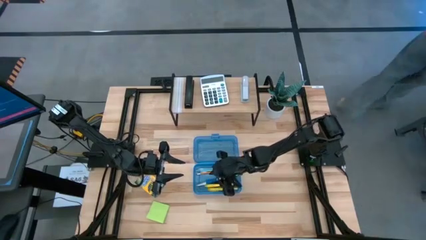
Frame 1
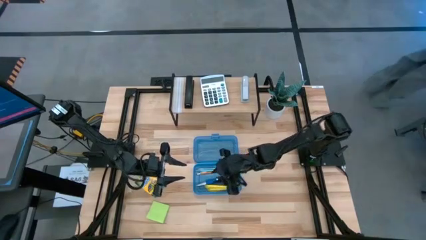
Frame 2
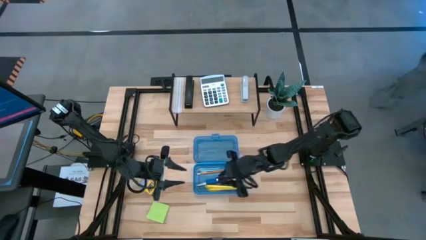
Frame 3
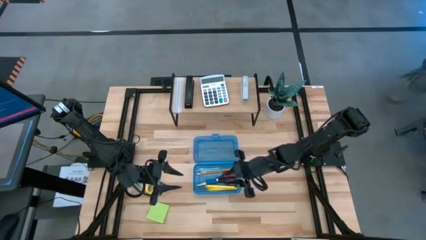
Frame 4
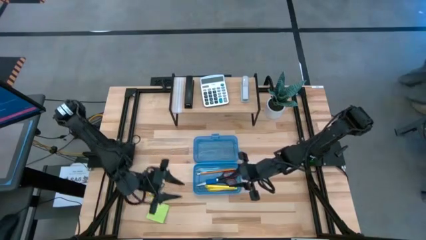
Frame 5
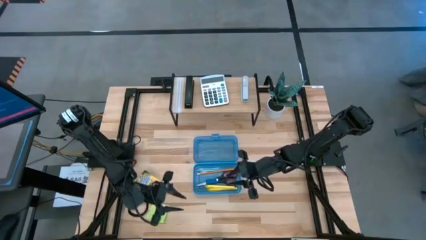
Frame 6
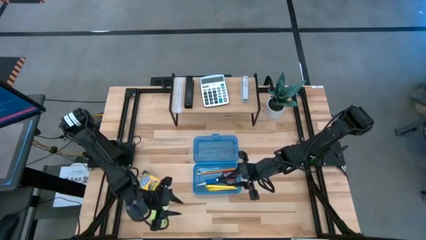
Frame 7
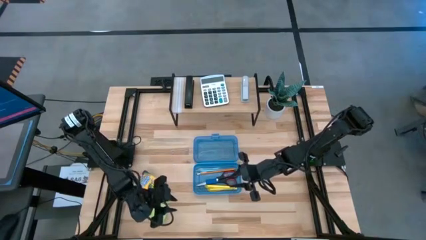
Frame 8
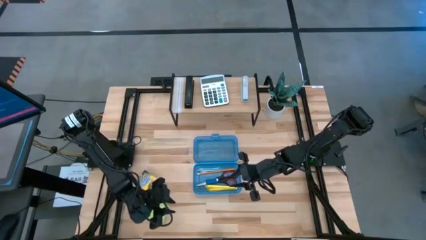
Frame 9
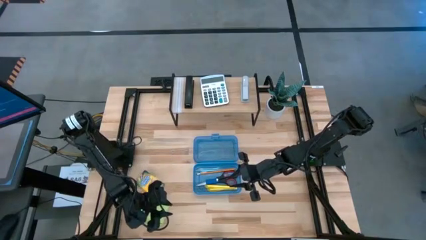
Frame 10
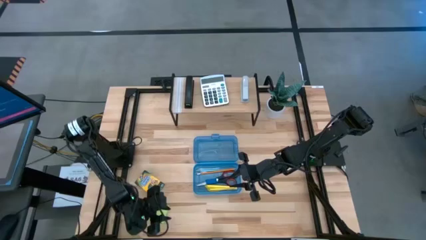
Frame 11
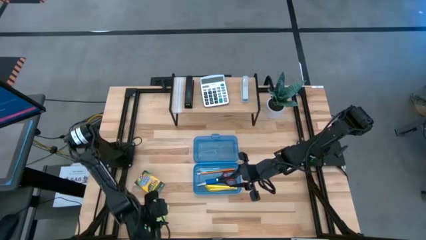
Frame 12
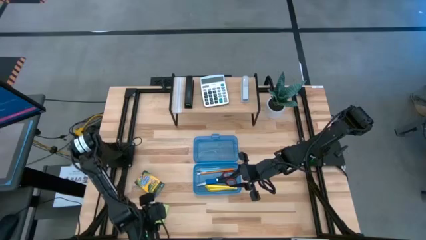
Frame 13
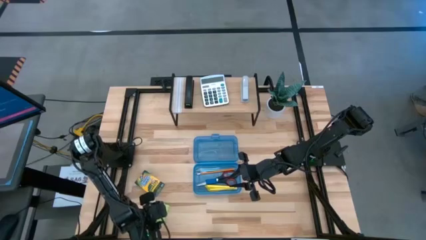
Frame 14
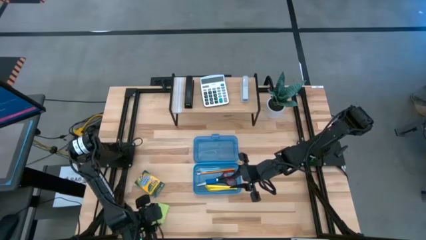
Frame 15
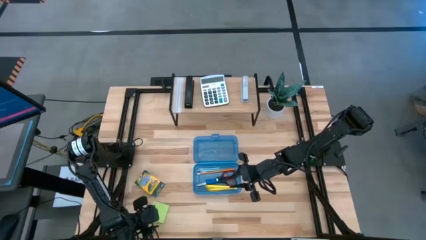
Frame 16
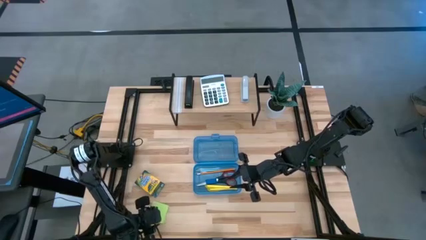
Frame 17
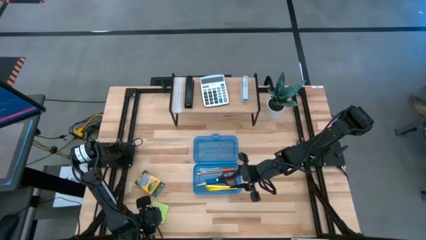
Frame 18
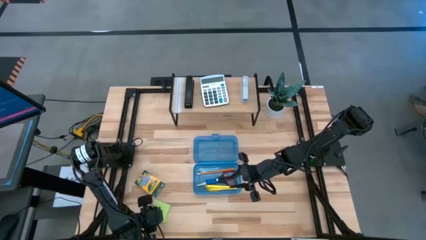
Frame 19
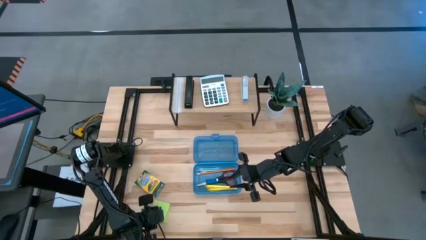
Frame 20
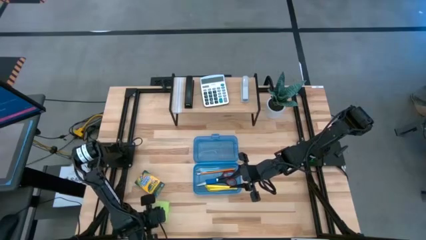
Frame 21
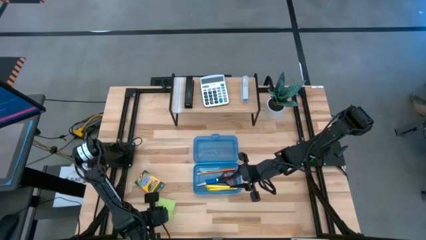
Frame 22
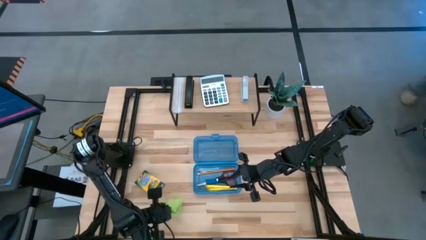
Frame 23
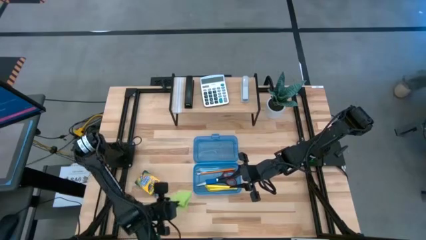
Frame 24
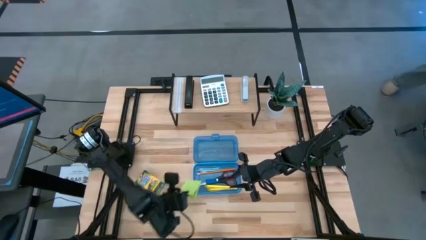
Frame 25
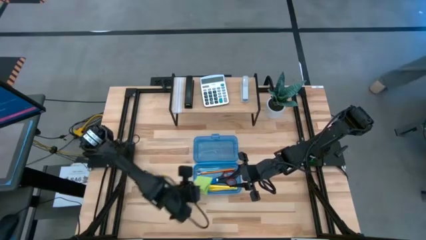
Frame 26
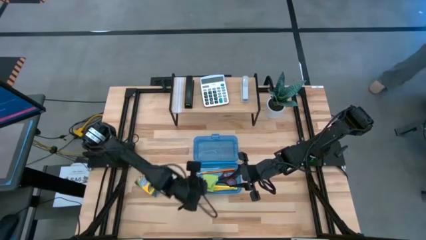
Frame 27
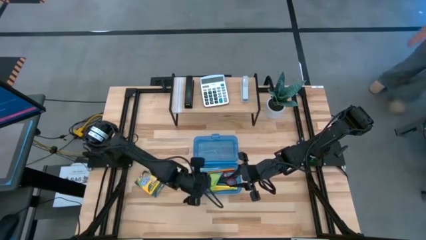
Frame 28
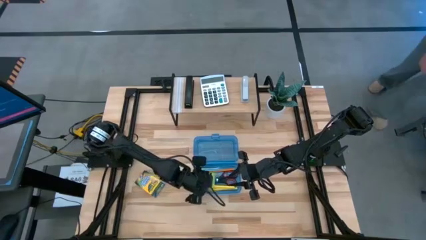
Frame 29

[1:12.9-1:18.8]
Task: Pack school essentials
Put the green sticky notes into the blue supply box

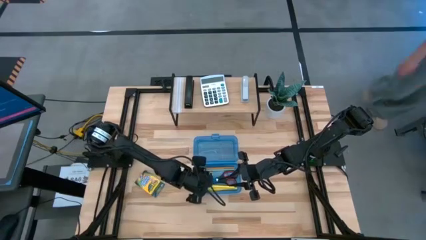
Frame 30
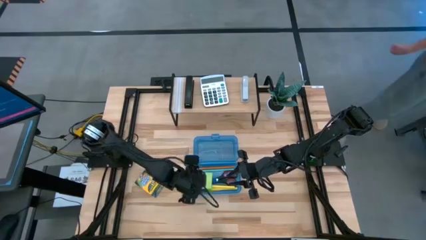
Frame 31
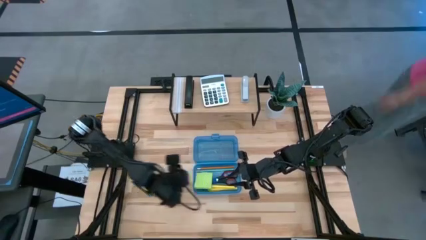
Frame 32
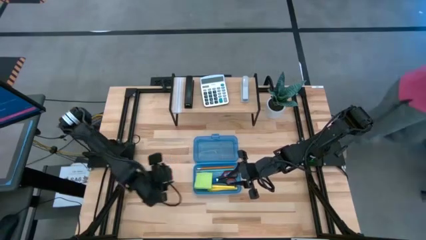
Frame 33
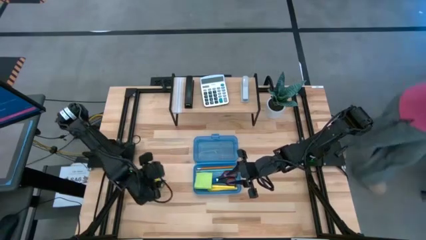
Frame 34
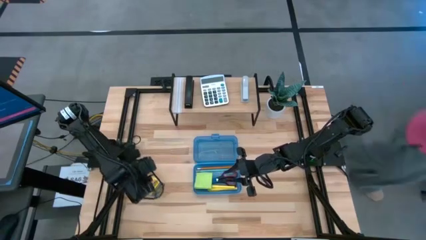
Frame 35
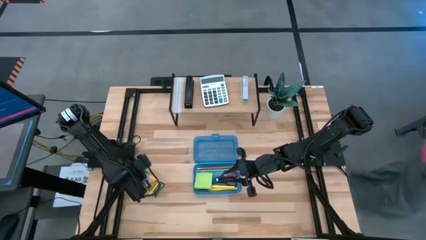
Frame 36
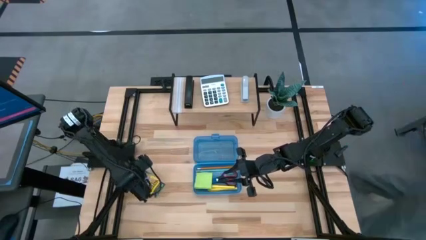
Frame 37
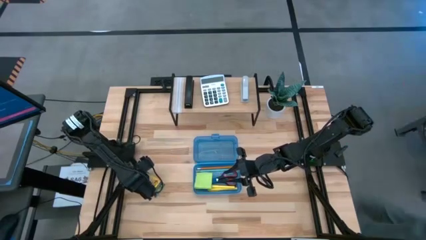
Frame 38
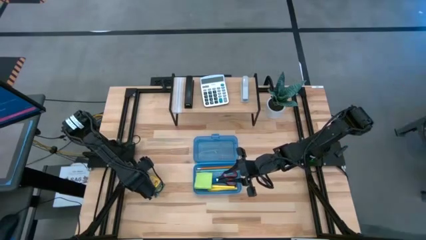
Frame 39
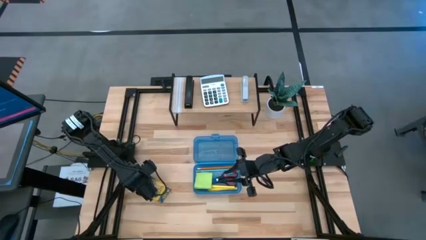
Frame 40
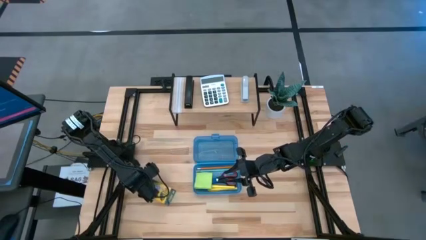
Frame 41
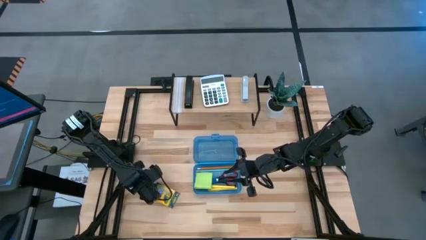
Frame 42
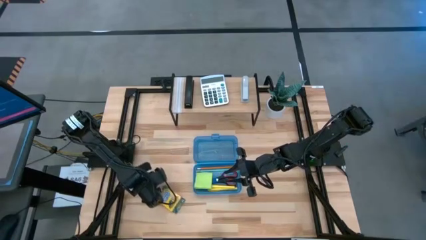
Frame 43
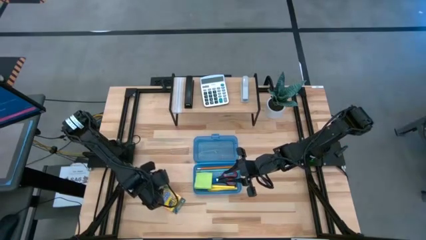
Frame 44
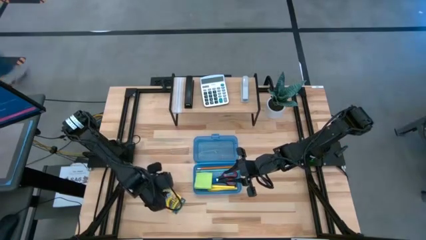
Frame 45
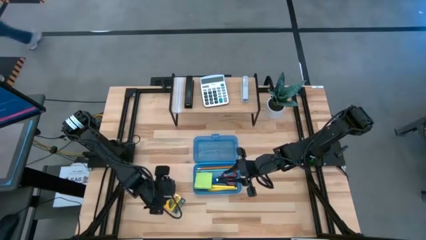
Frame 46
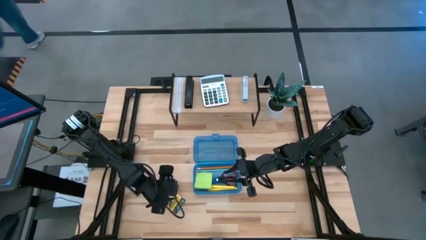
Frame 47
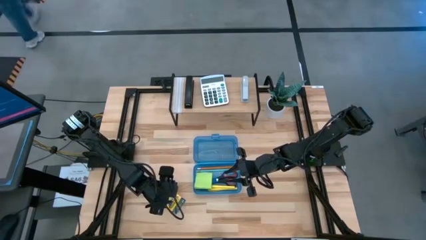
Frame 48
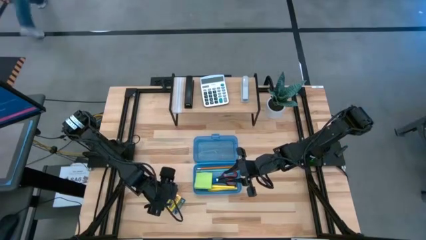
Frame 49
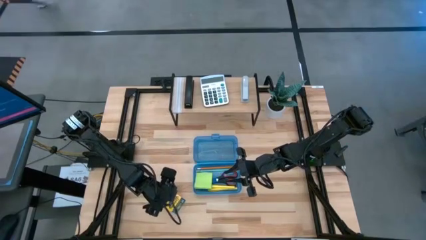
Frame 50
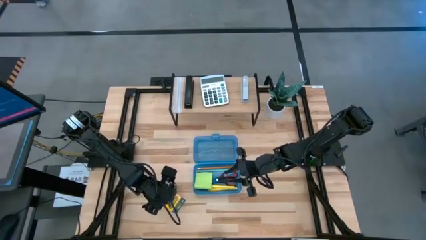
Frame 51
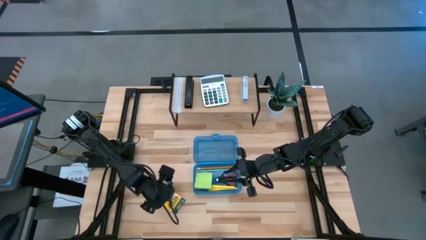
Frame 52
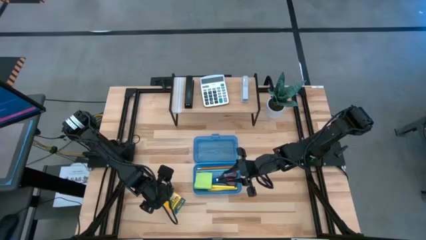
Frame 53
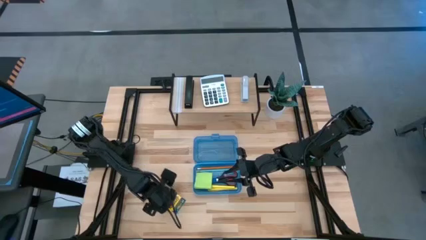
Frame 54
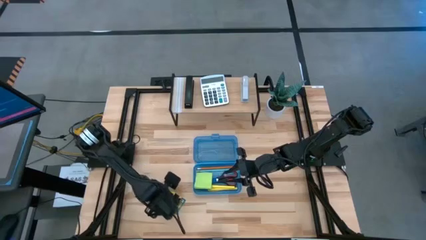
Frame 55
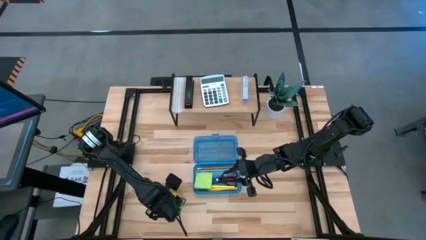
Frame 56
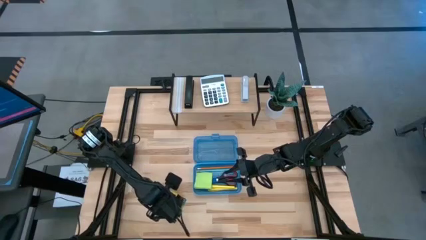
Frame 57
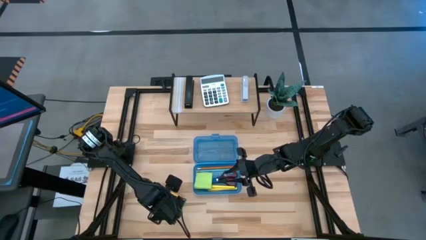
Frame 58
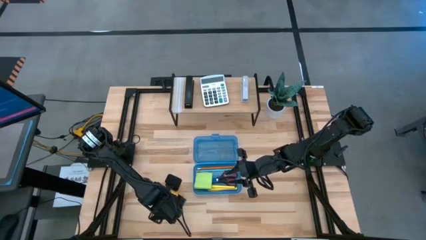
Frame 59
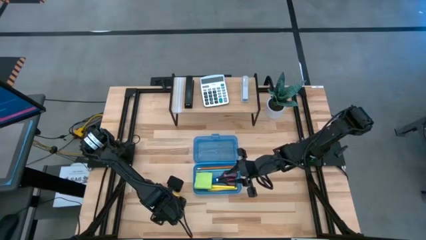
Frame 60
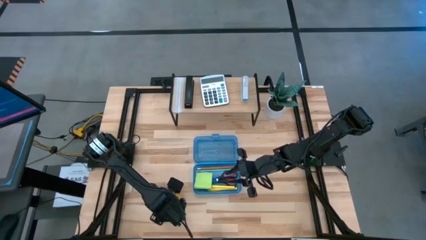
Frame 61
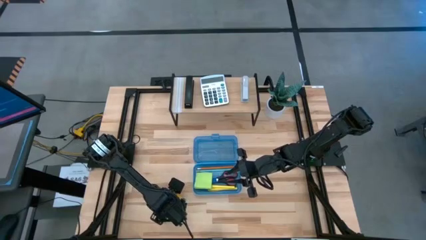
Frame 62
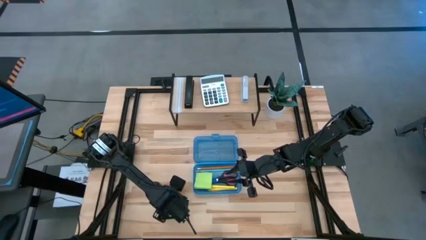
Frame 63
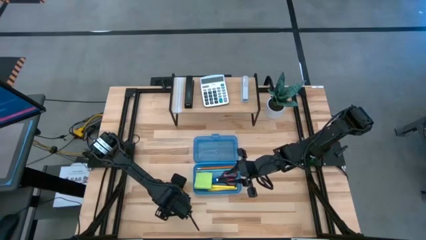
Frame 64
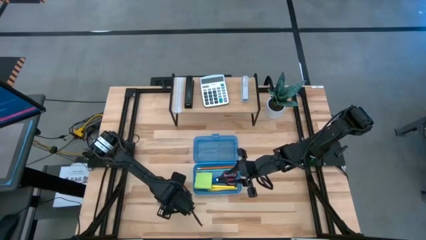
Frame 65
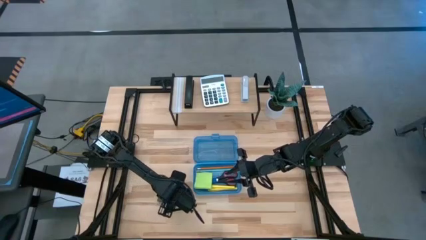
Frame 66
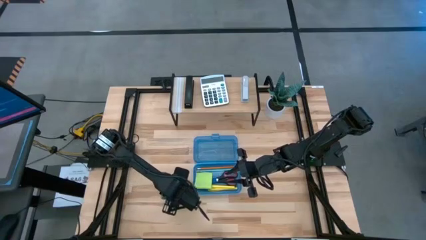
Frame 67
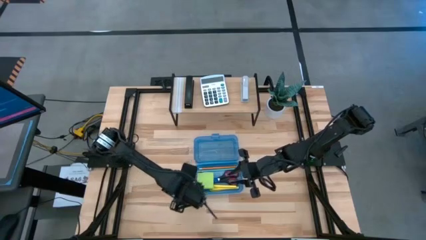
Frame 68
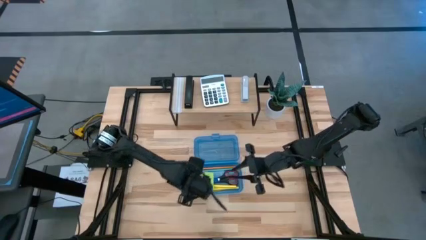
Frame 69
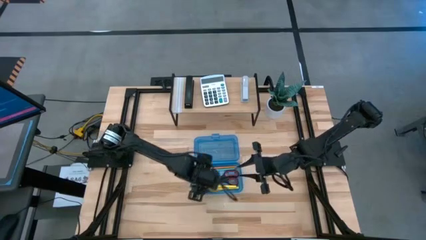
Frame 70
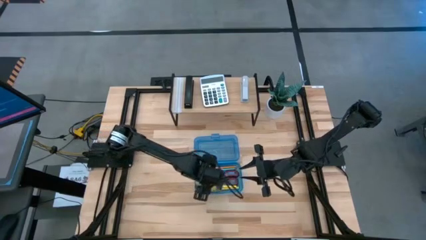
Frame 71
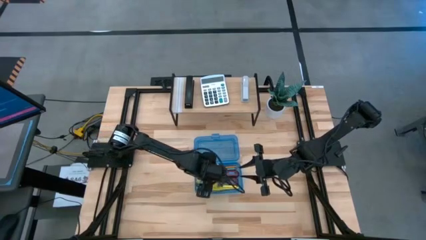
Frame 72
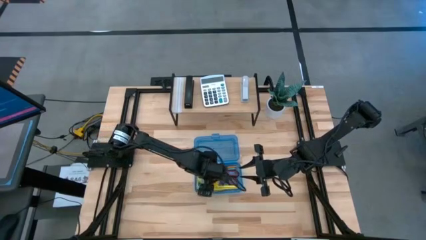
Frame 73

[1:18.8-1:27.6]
Put the crayon box into the blue supply box

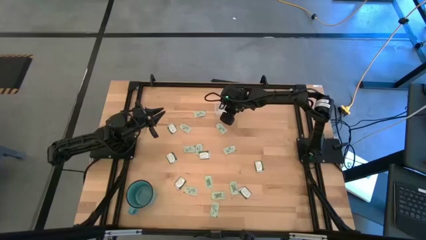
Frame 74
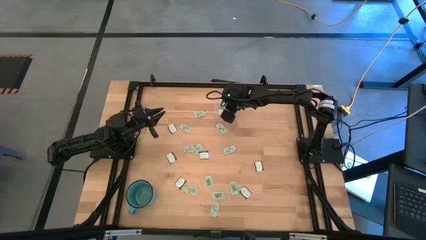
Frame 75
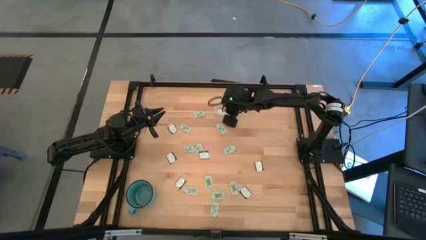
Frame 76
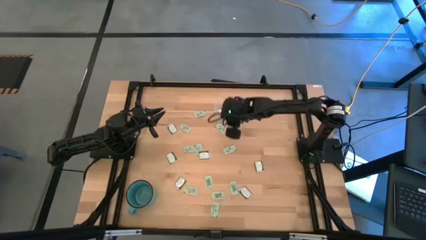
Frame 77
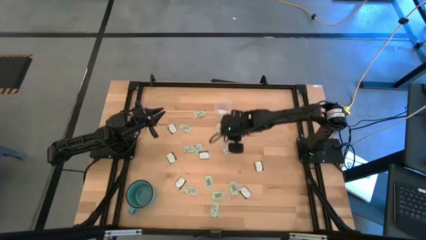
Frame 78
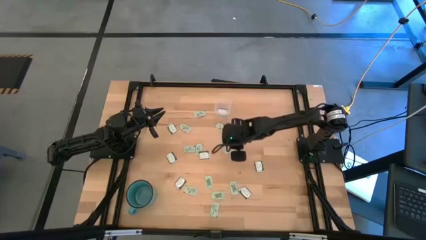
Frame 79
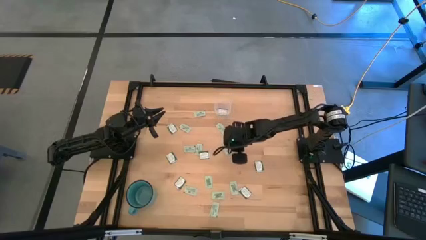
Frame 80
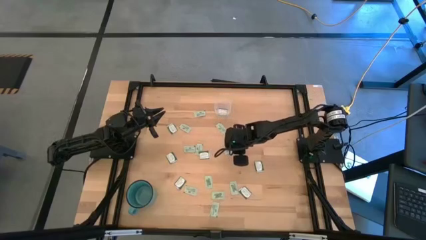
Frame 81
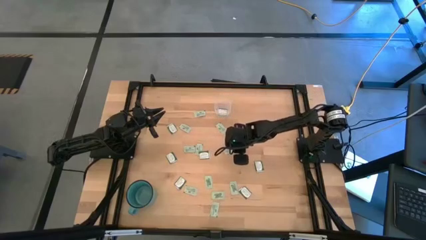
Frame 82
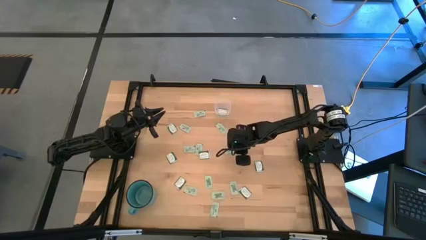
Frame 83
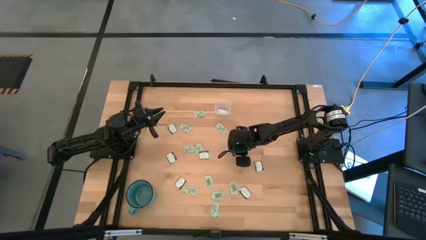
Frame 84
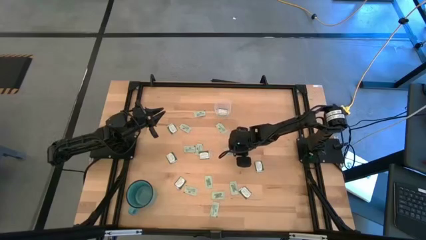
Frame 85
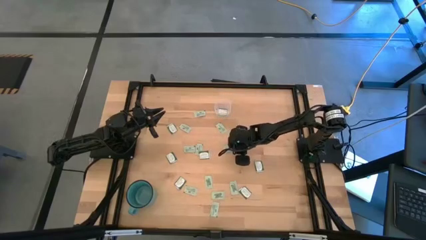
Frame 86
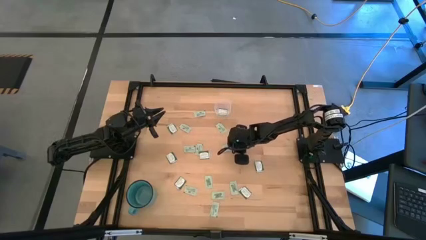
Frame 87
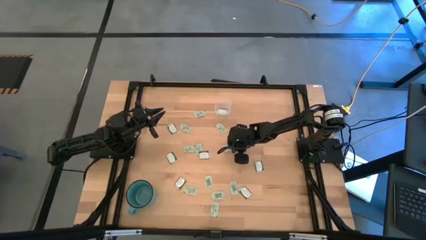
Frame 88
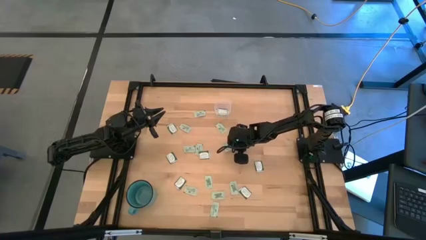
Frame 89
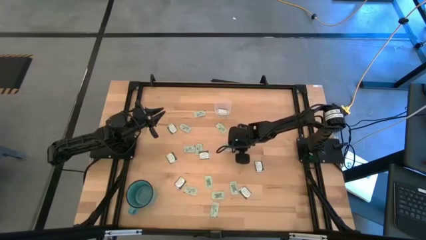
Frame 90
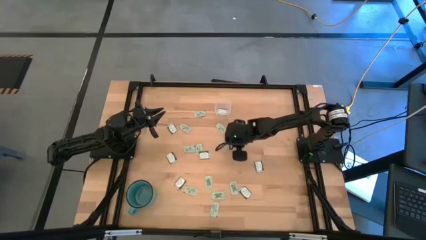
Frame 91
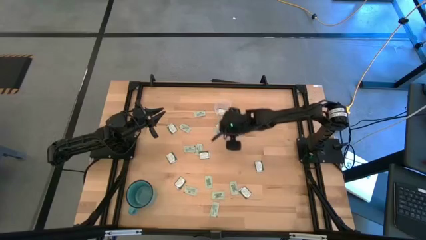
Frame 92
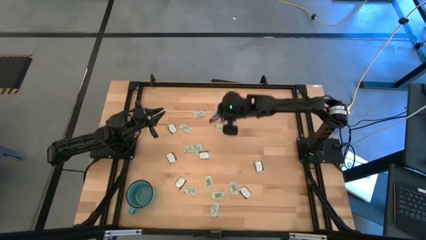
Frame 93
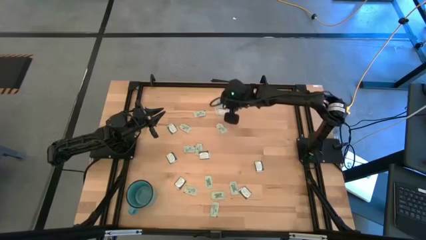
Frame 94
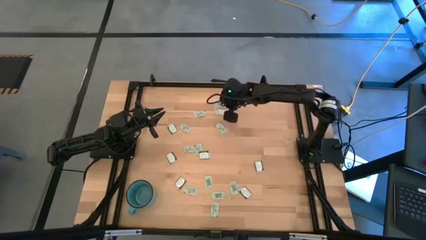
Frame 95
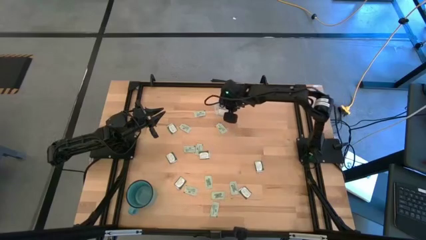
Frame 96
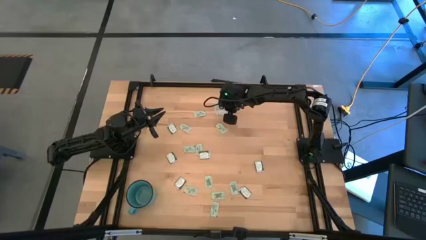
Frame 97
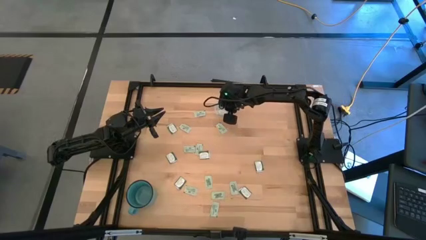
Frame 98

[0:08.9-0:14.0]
Task: Pick and place items into bin
Put the light green stevia packet into the transparent bin
